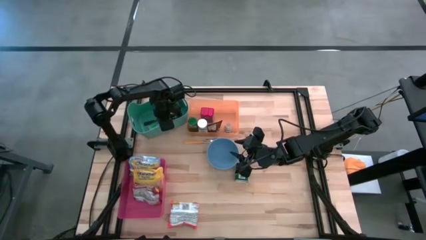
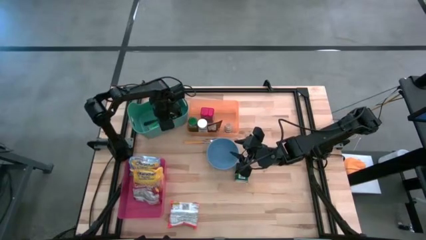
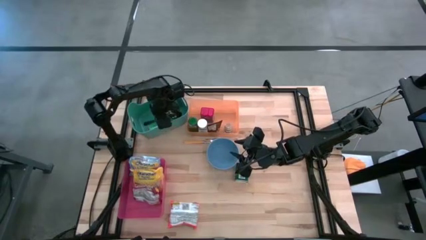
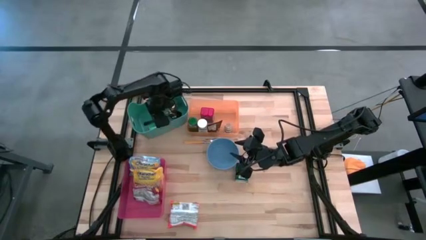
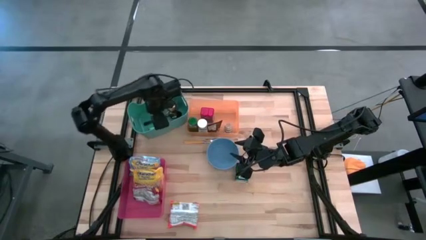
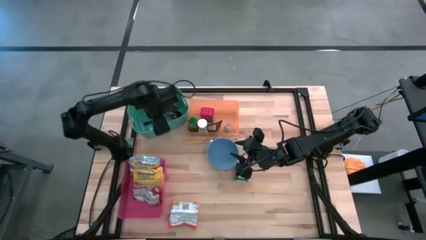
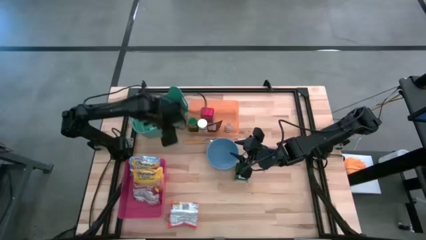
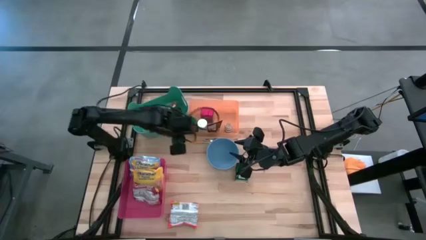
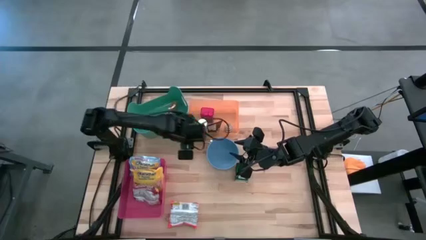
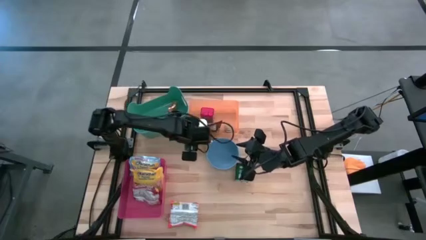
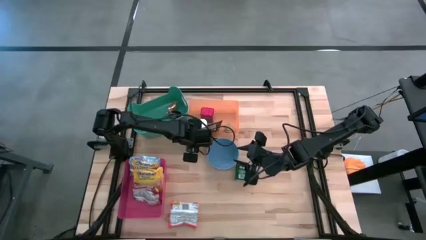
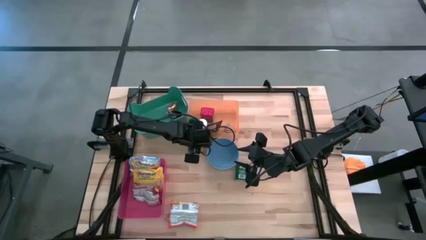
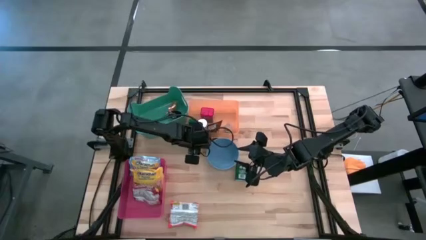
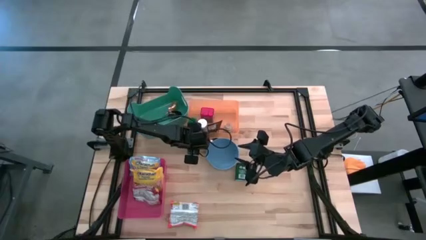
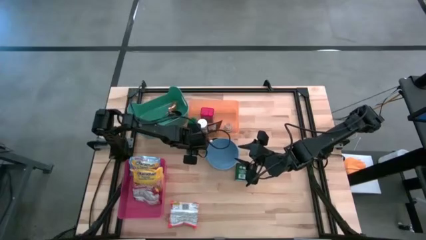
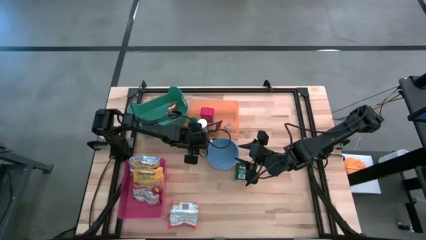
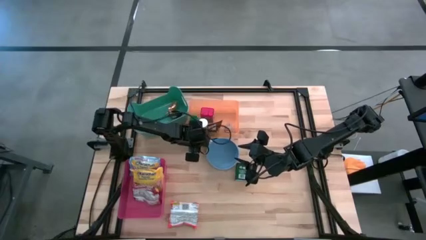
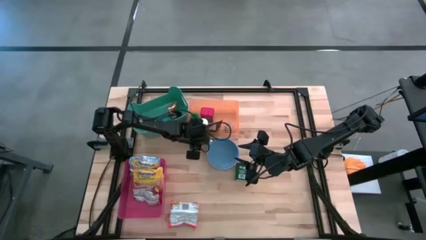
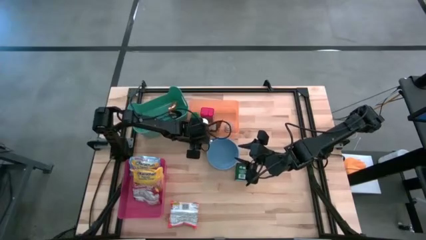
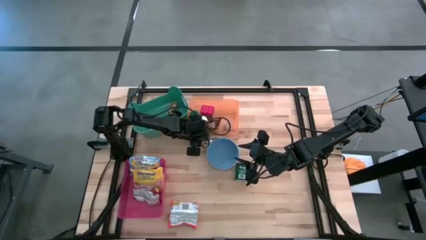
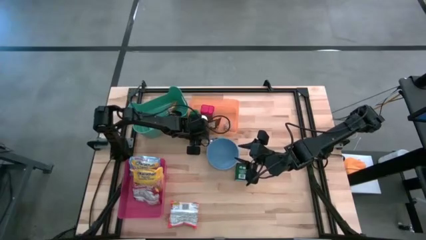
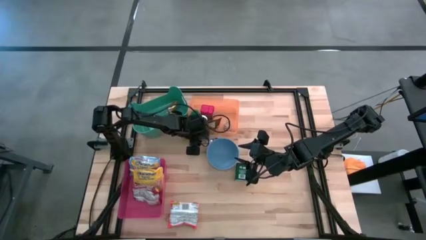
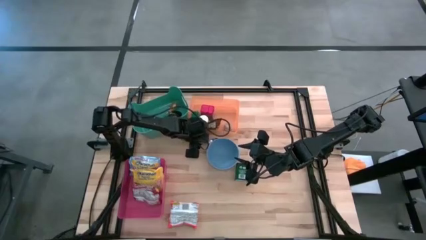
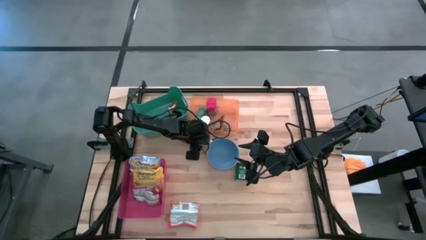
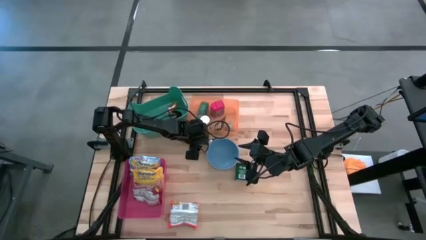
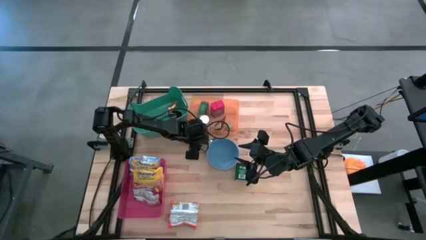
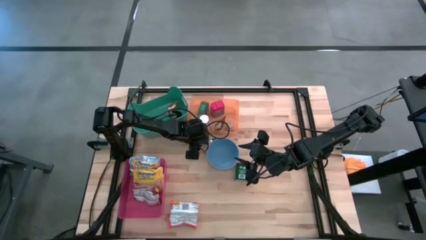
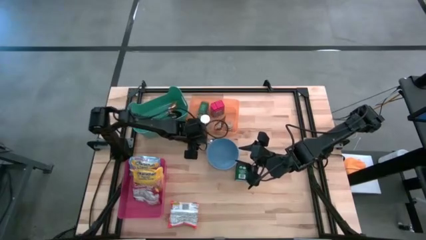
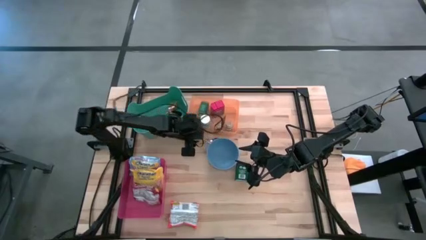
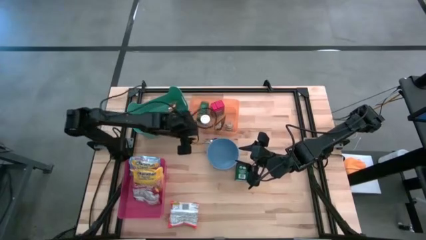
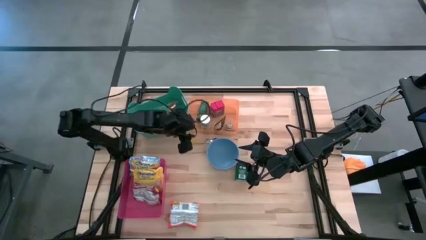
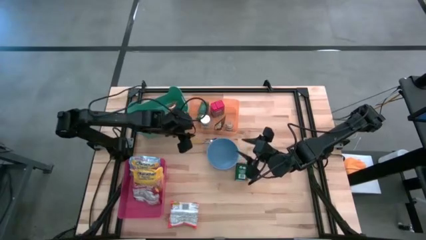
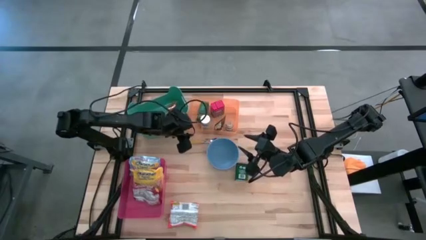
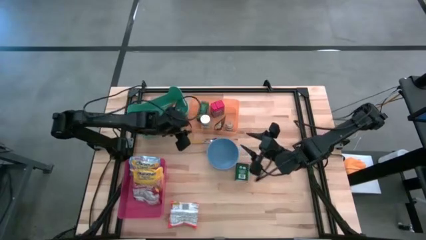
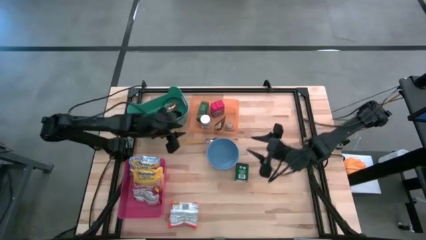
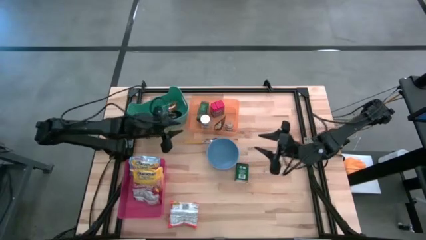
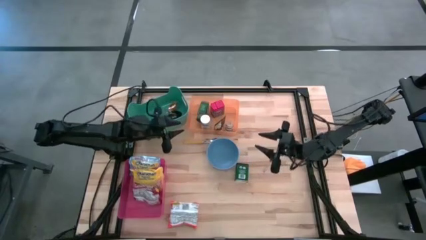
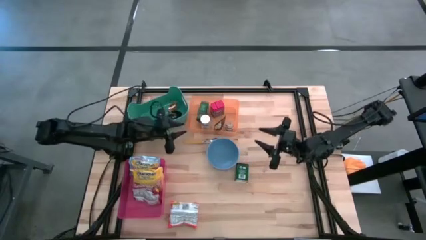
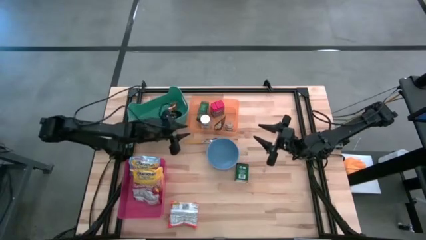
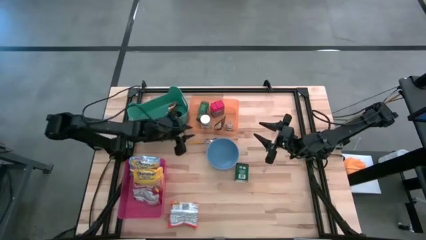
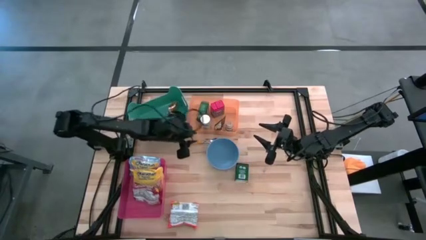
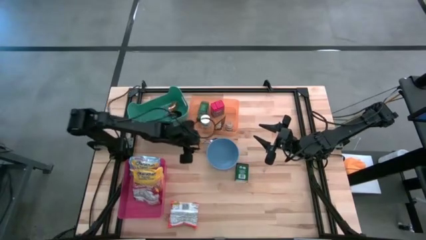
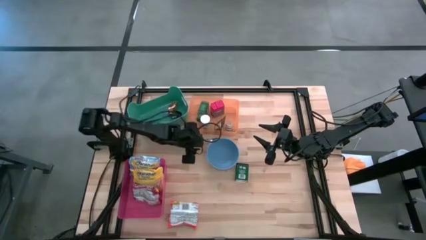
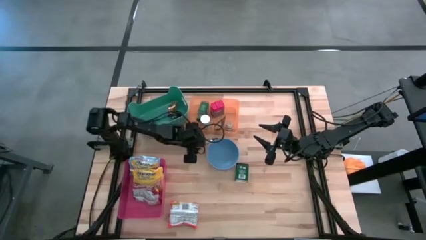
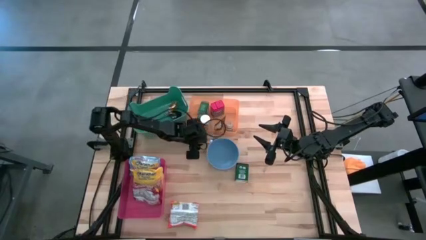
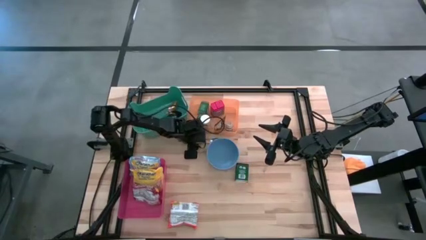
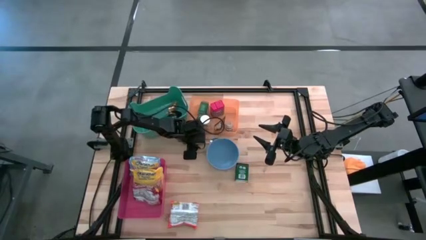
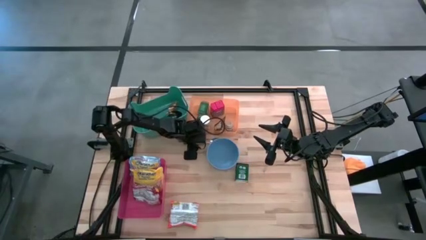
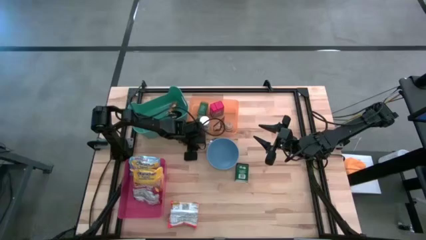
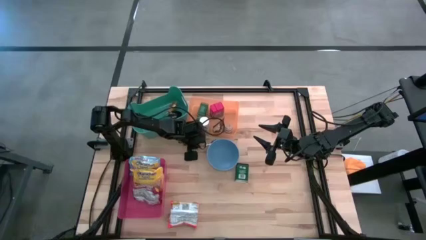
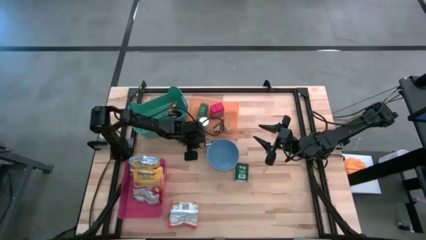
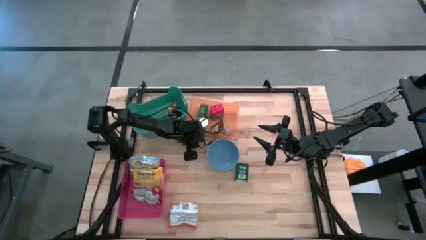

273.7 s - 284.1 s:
Put the yellow spoon into the green bin

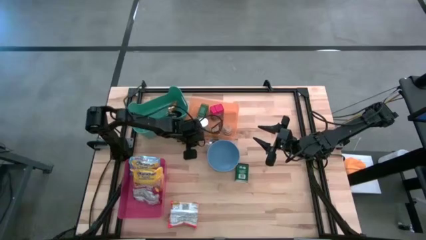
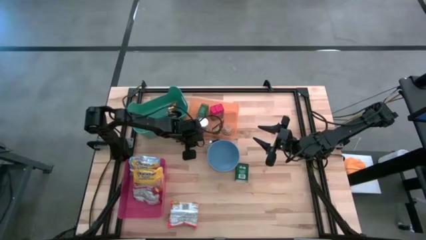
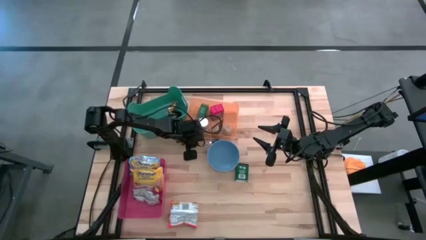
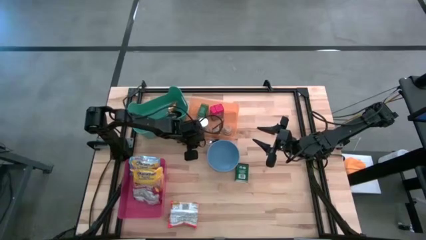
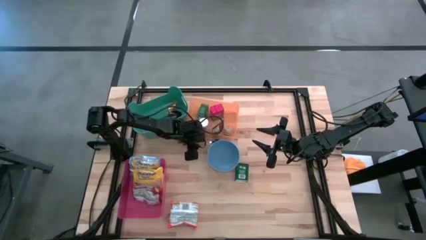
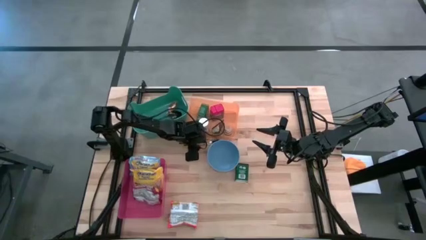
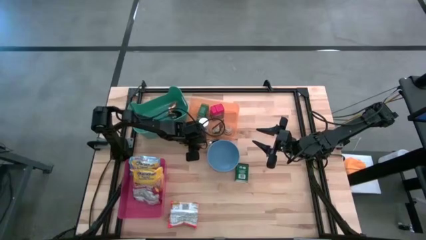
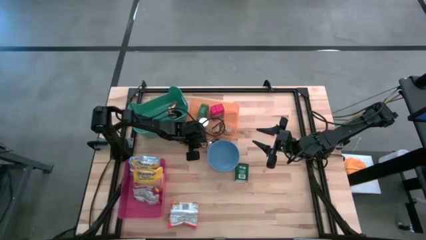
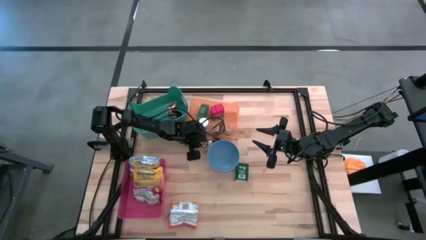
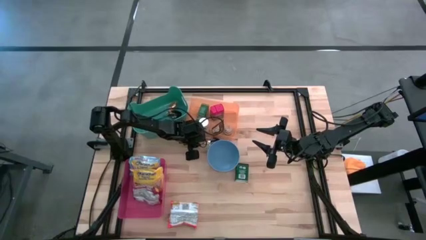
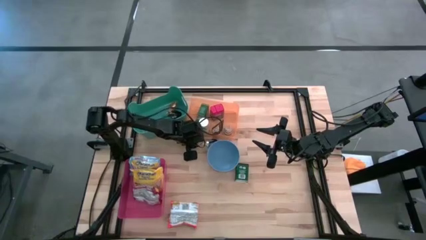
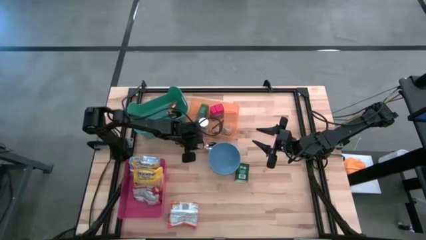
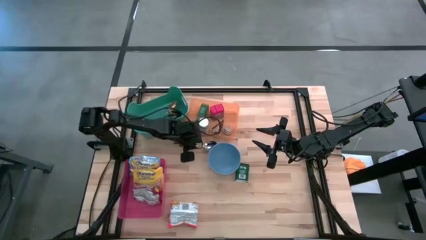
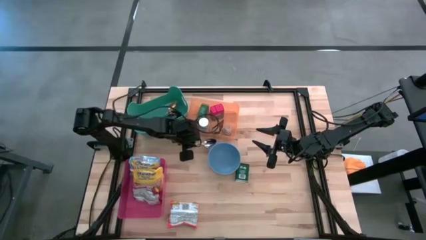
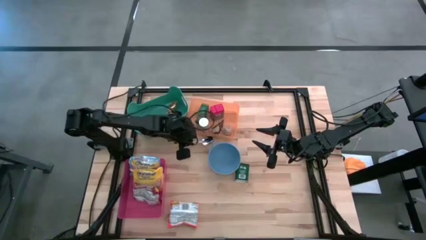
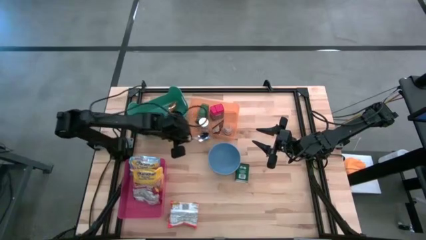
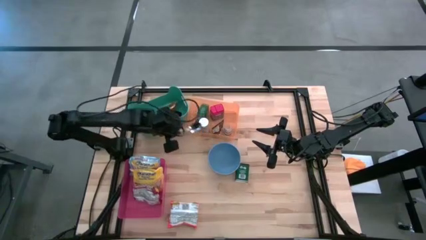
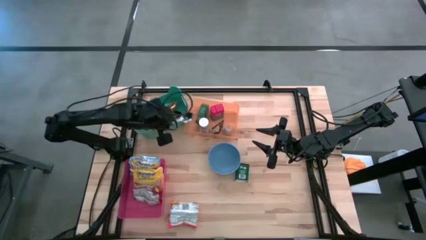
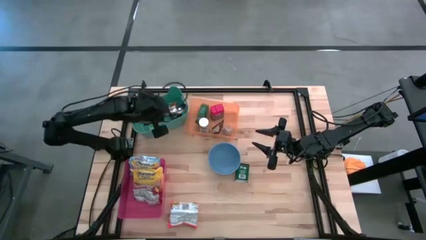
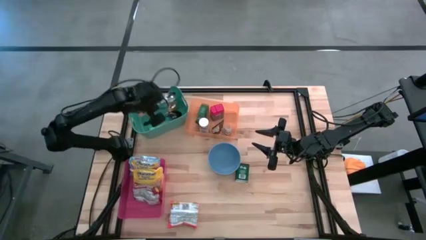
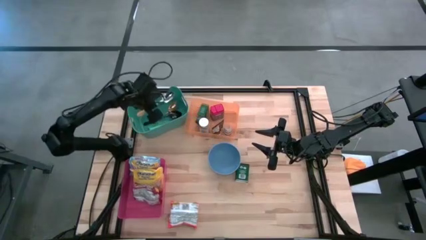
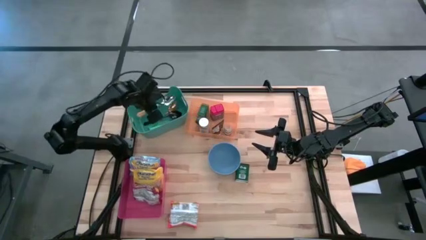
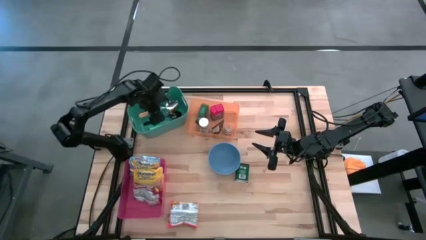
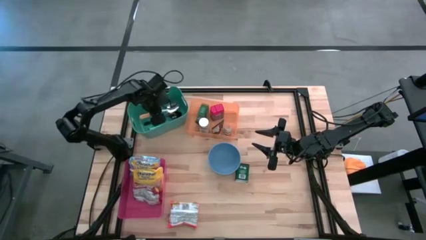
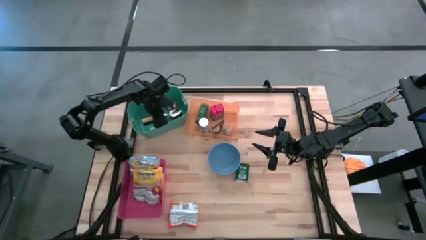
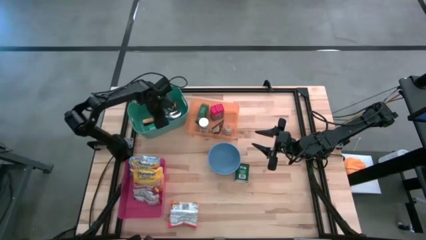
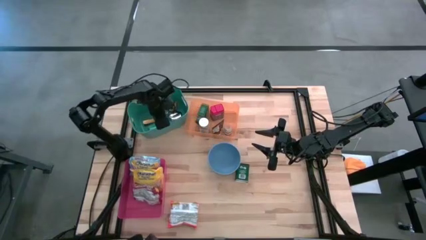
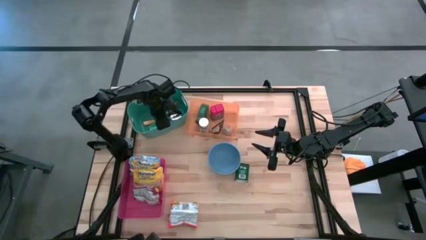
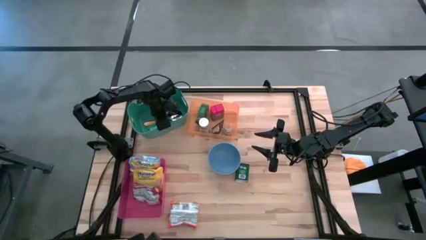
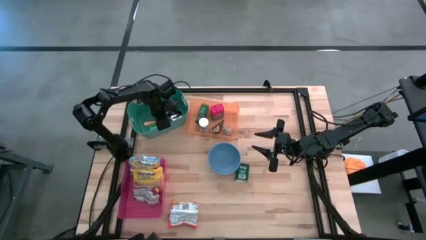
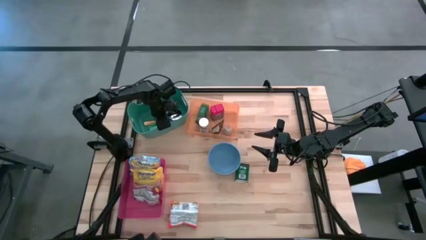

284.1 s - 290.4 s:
Put the yellow spoon into the green bin
